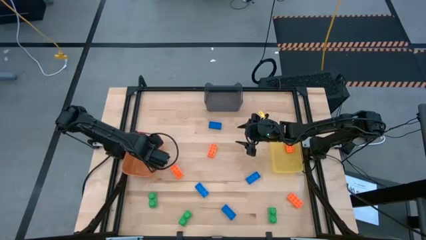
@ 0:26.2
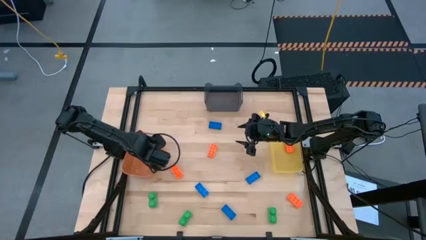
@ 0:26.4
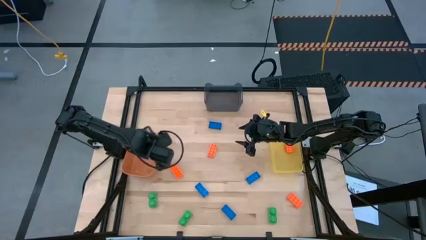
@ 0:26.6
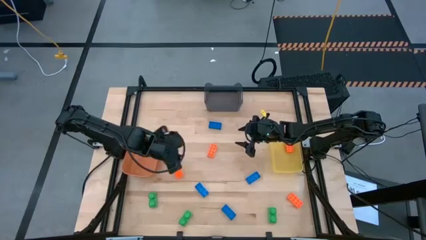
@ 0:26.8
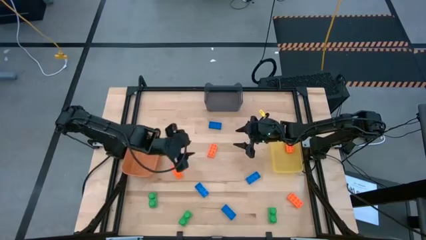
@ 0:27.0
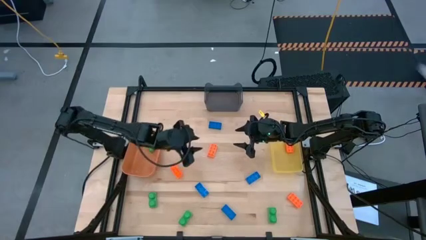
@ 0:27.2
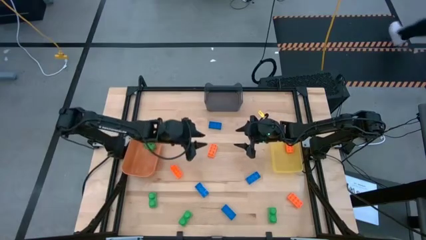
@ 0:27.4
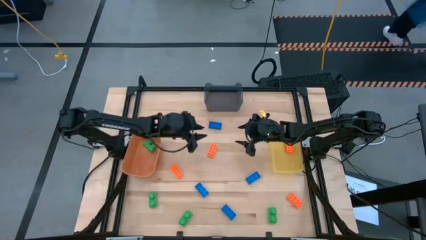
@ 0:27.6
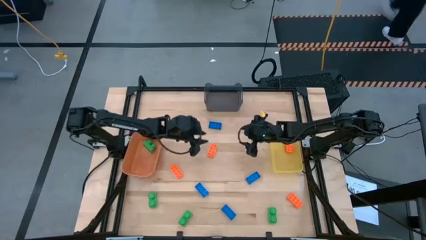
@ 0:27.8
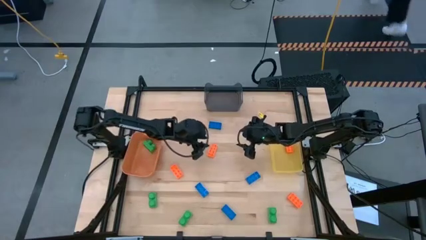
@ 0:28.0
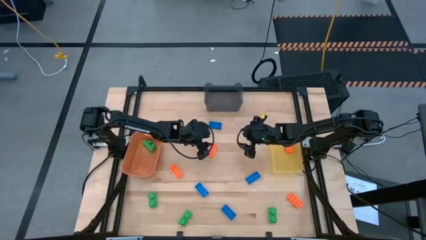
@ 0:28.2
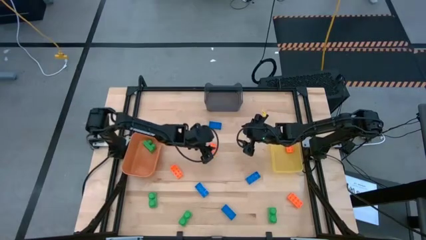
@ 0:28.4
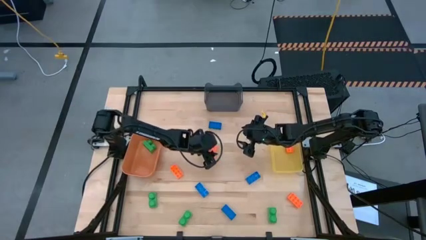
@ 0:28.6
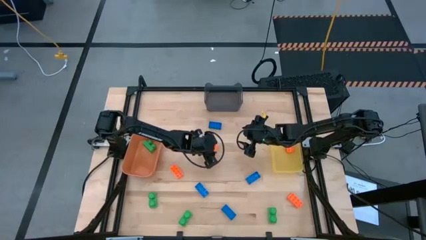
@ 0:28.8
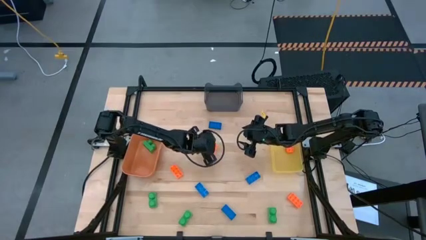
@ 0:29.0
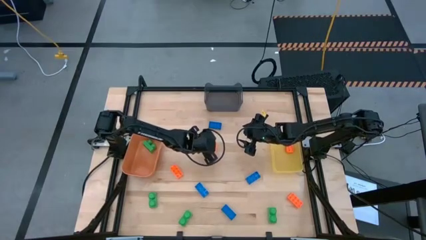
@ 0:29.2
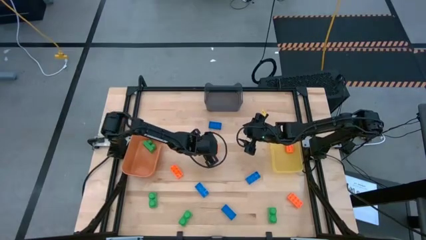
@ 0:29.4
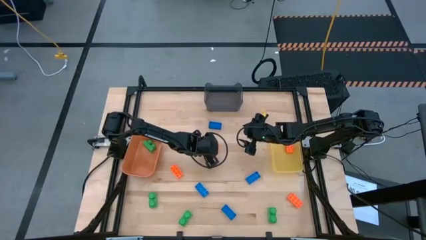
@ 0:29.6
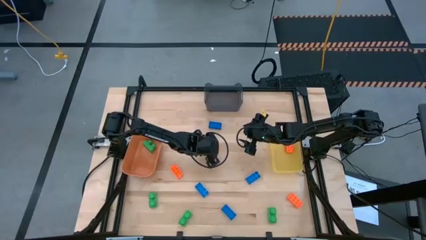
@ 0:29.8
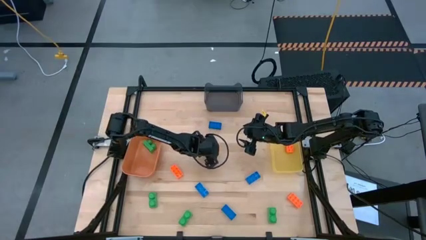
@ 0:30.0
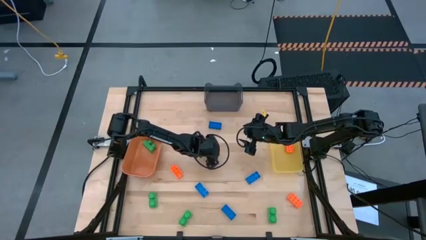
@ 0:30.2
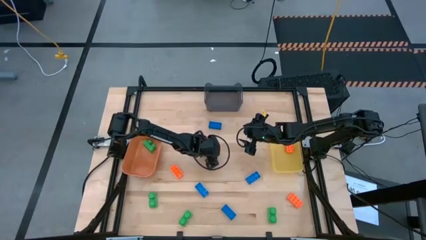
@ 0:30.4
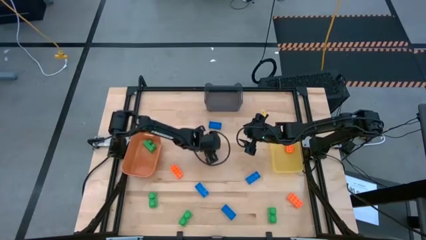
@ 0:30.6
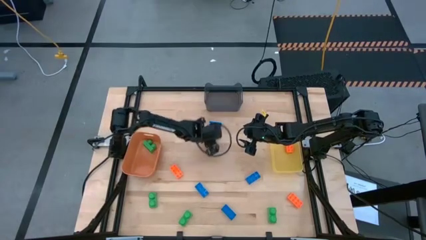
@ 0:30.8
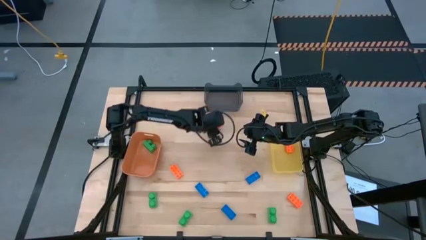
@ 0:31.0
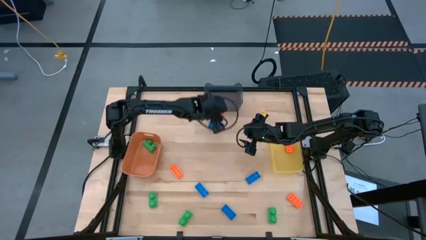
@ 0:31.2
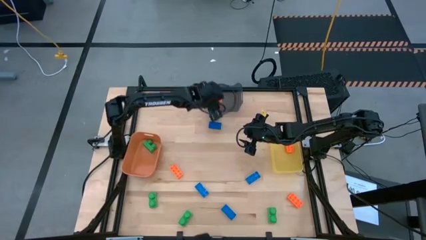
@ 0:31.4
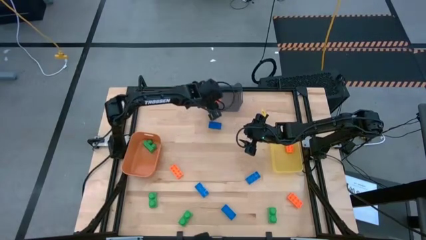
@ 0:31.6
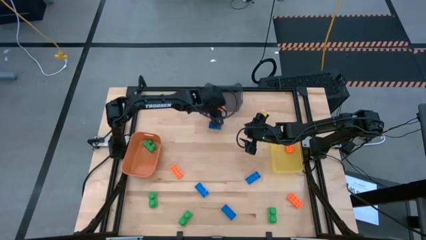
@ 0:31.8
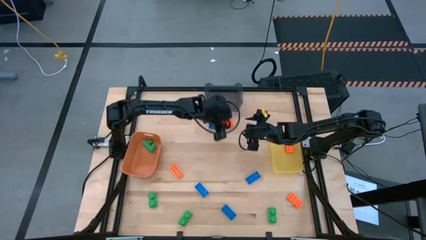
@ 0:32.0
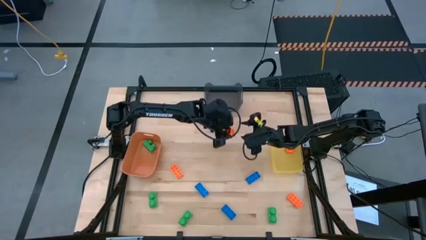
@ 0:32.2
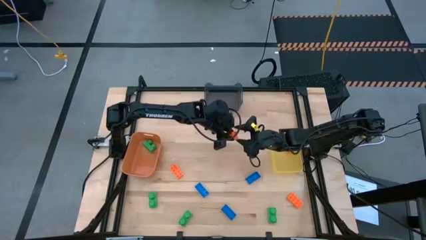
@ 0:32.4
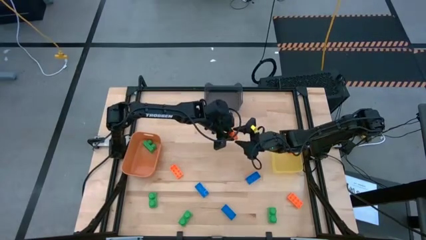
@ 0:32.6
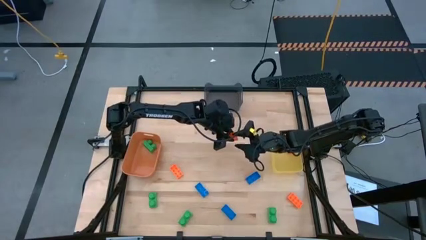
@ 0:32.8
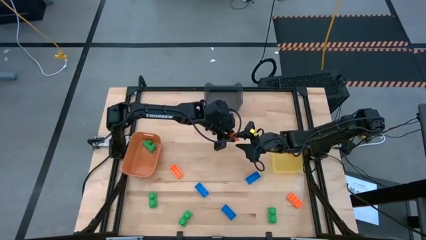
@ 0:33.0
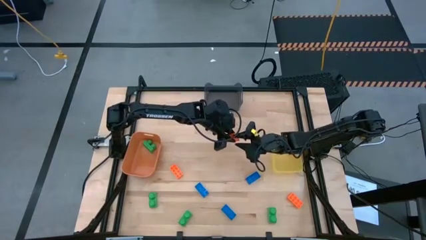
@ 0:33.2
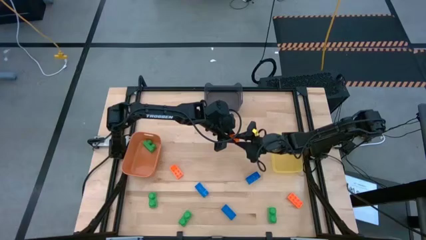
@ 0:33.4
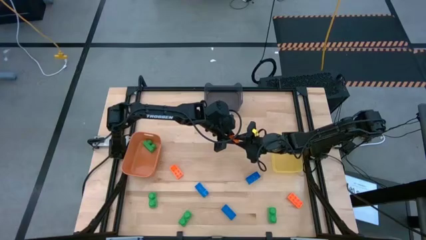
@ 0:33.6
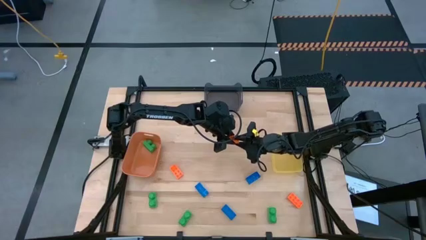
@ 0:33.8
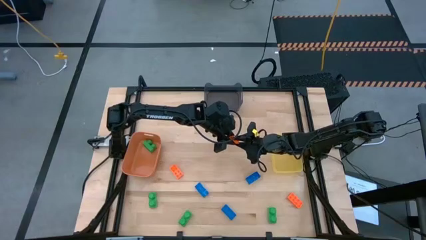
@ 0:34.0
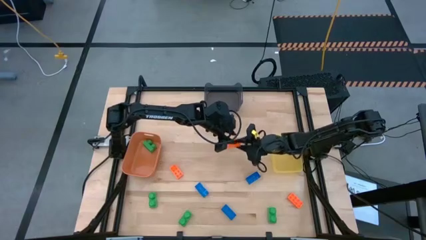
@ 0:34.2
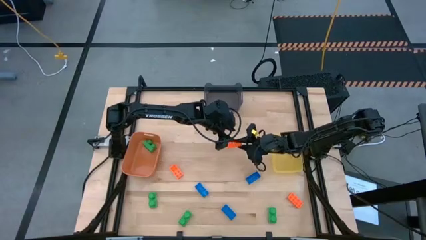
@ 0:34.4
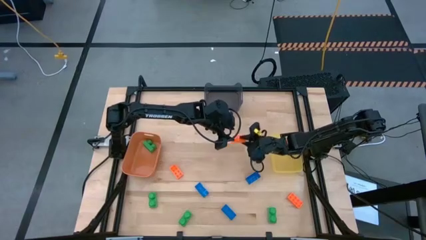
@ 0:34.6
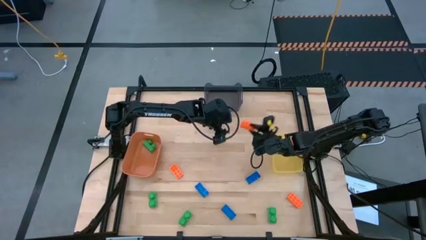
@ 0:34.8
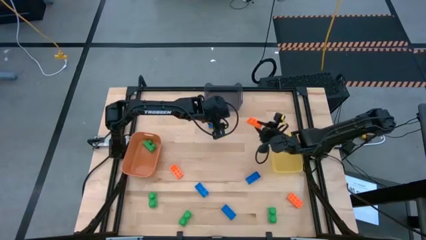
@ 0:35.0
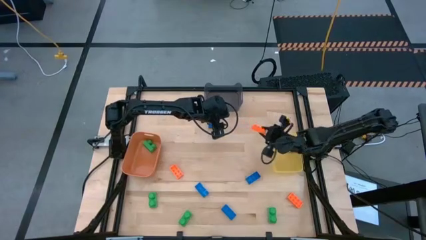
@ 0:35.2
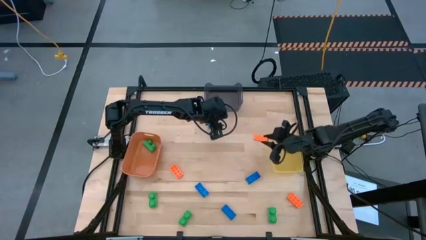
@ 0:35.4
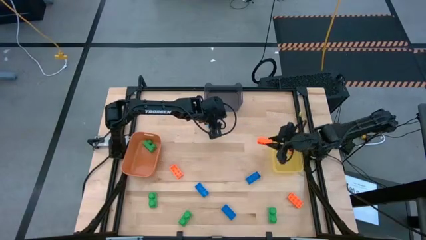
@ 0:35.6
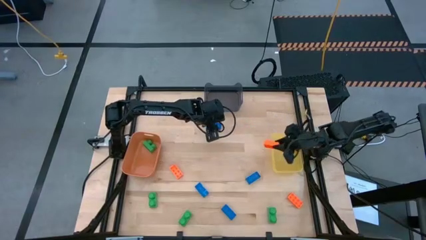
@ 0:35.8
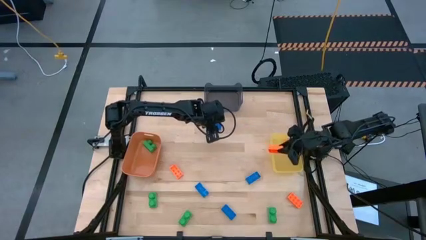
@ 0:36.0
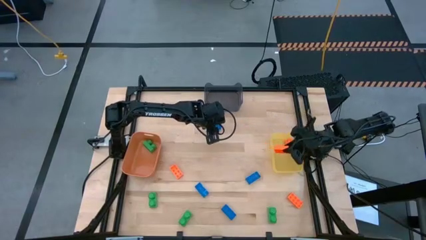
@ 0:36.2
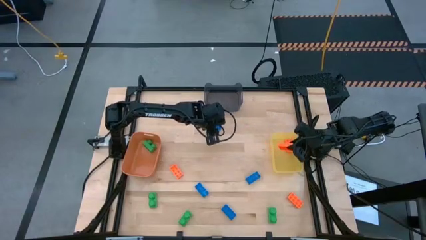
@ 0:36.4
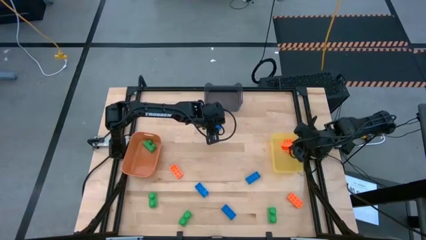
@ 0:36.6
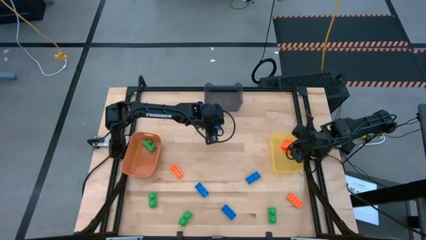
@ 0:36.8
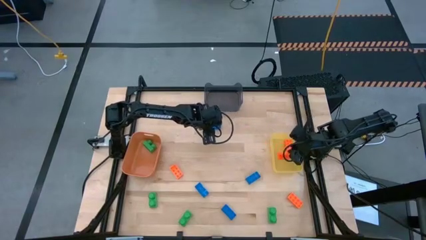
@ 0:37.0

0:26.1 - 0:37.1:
Task: Sort & place blocks by color
Put the orange game piece into the yellow bin

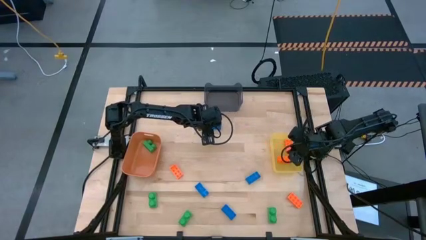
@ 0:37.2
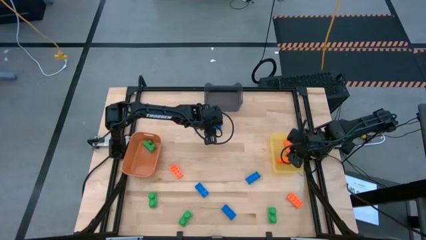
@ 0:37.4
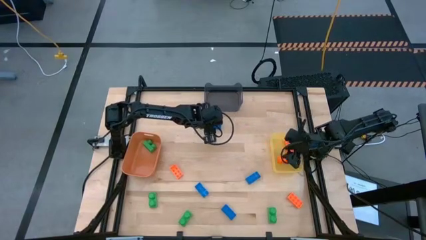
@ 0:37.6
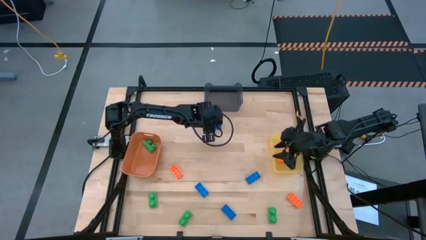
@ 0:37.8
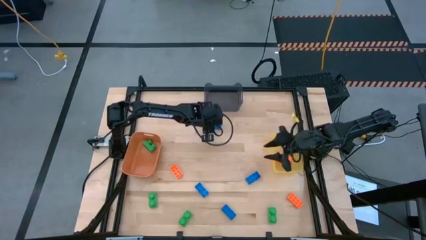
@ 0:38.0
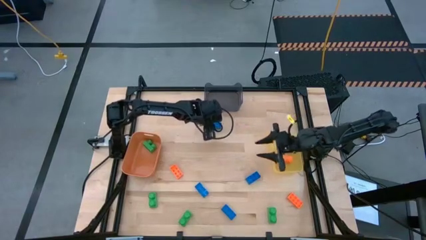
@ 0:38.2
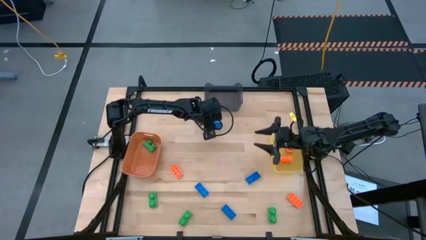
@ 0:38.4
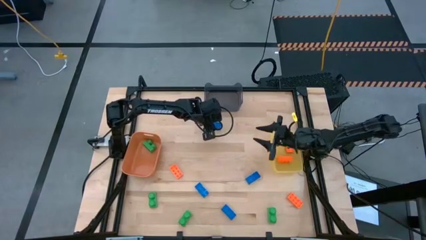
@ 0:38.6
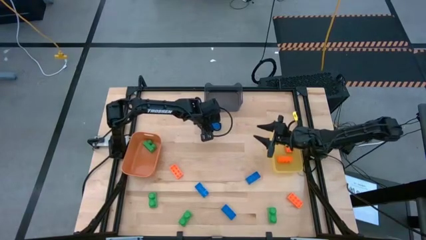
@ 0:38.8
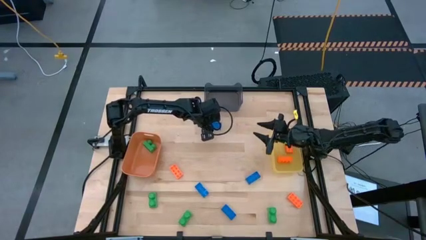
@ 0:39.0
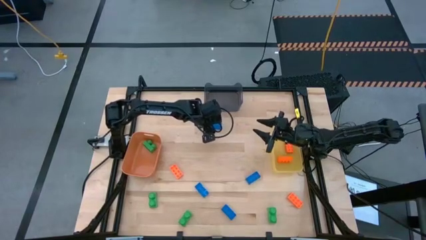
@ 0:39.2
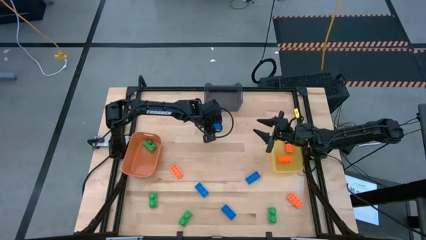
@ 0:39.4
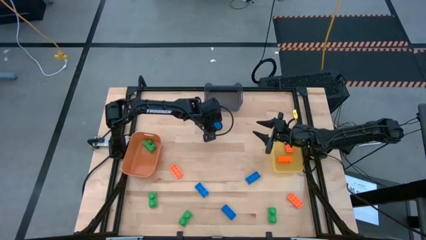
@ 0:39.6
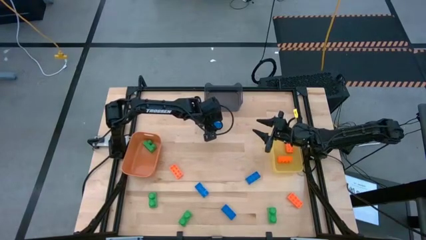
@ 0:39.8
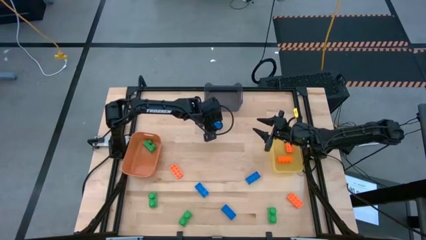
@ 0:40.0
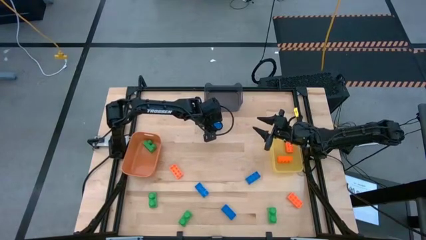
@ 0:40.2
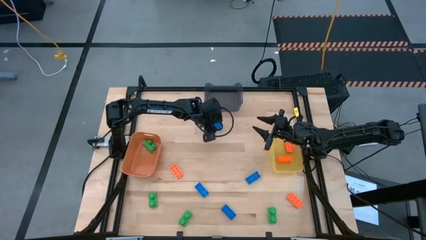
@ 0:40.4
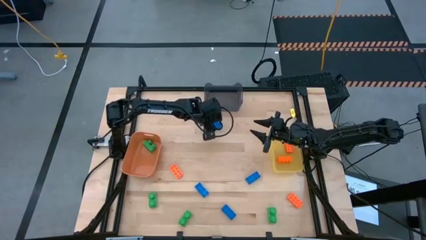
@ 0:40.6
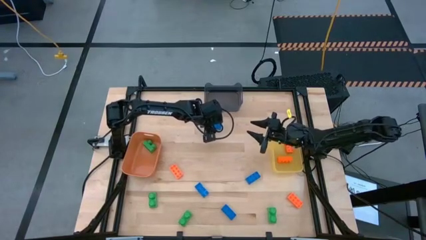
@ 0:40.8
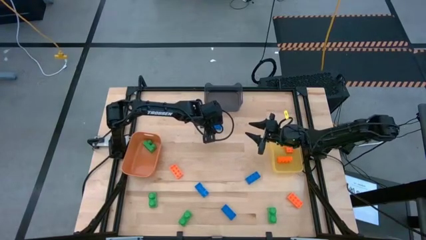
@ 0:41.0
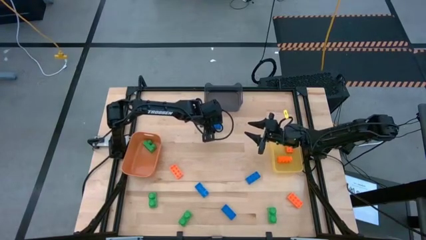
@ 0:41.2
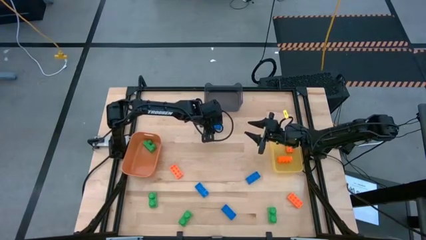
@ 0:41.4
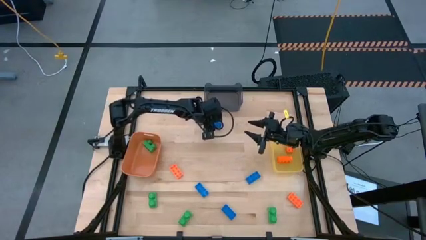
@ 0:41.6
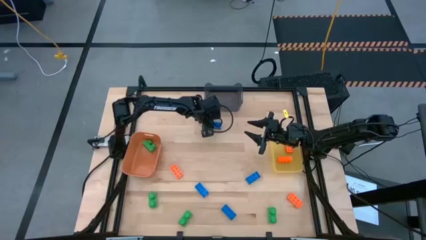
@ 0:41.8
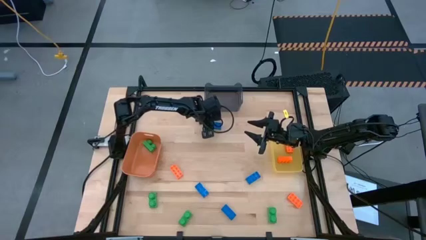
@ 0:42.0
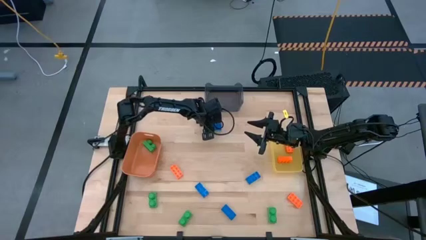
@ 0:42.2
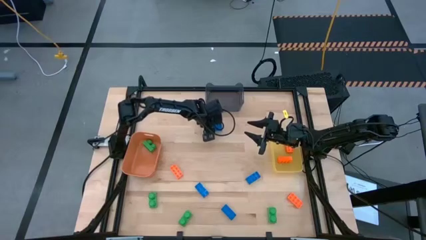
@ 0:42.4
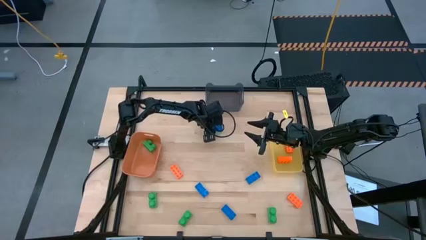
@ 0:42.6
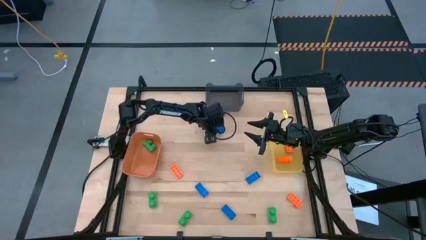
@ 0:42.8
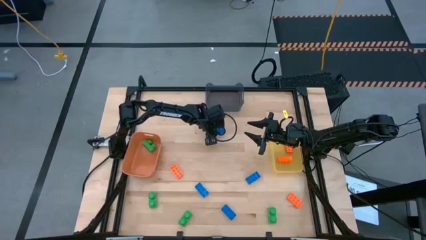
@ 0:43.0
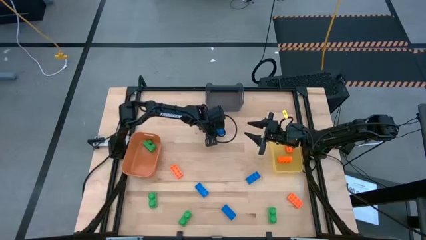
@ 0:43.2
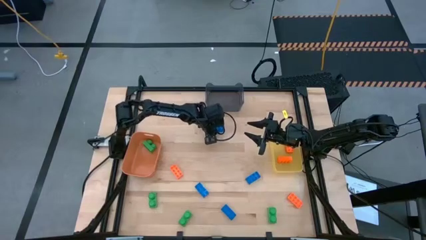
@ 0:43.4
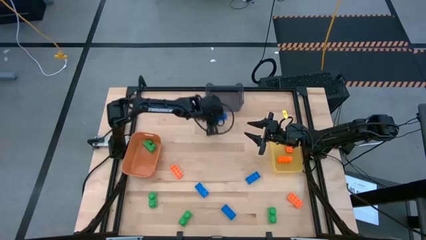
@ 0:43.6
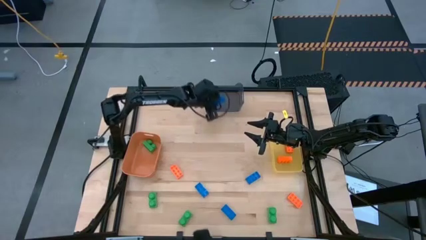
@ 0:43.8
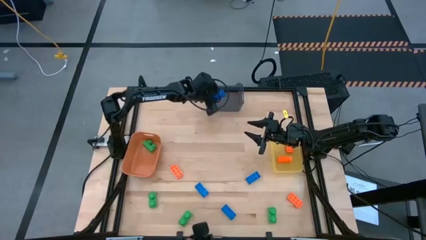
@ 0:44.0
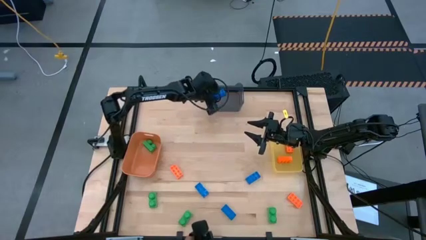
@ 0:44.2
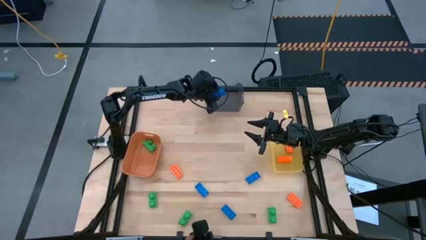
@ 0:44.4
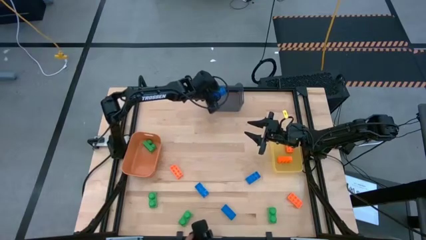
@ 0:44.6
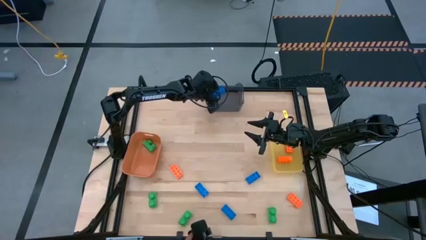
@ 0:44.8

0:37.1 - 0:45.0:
Put the blue game piece into the black bin
